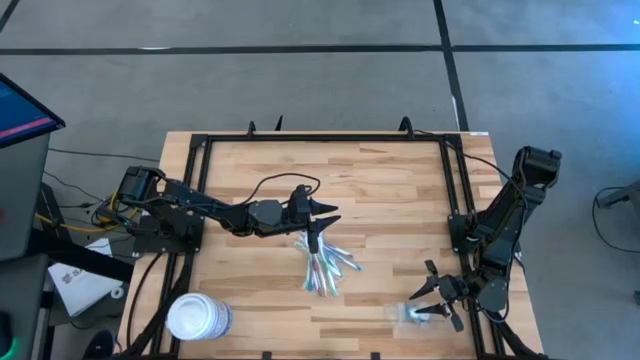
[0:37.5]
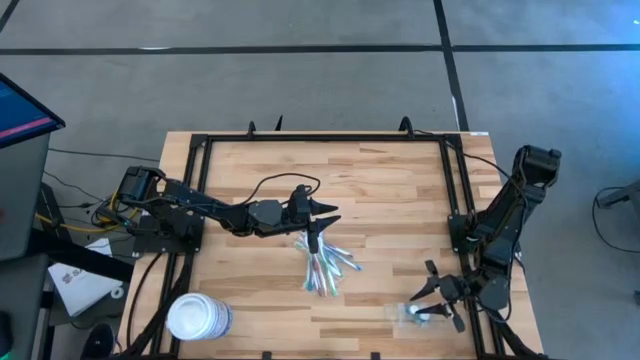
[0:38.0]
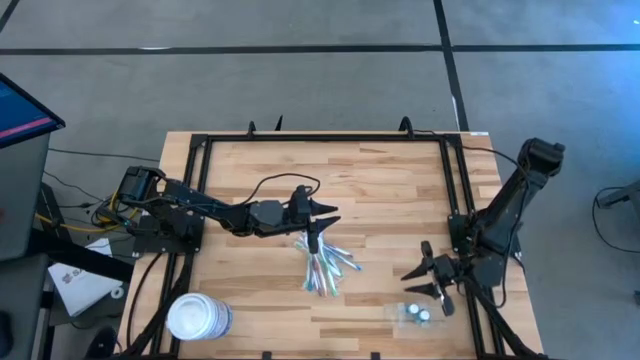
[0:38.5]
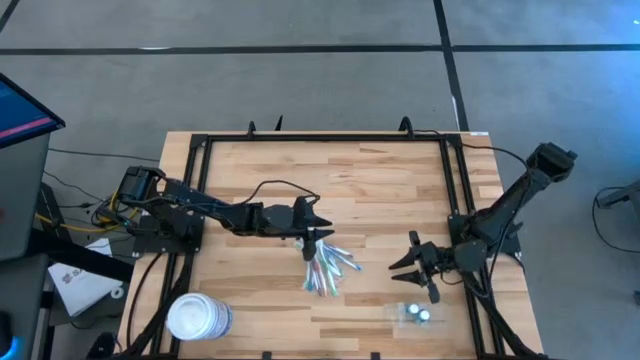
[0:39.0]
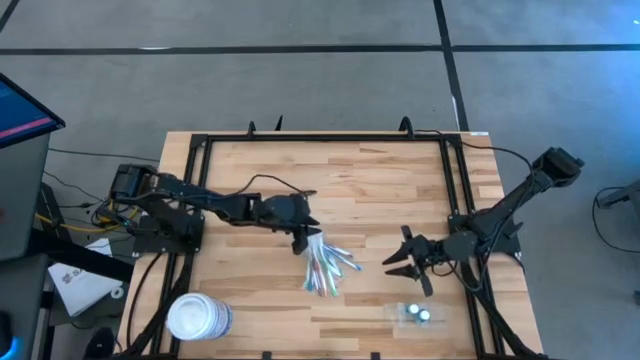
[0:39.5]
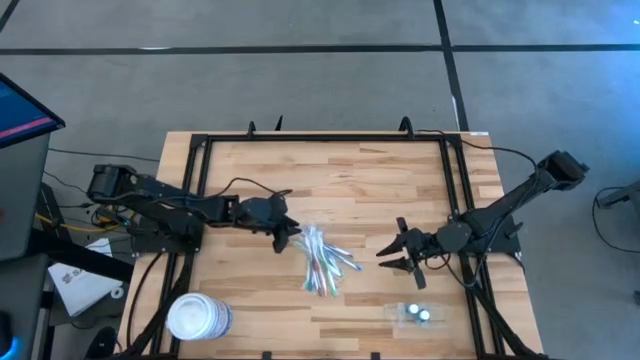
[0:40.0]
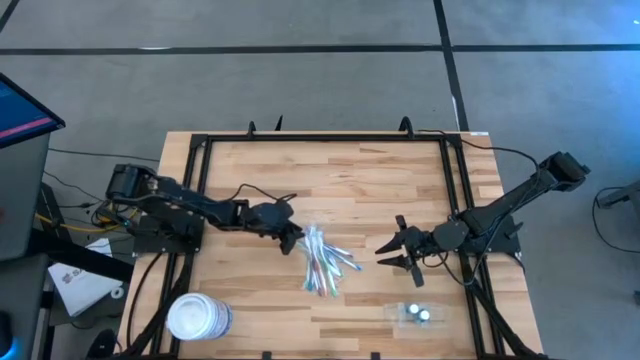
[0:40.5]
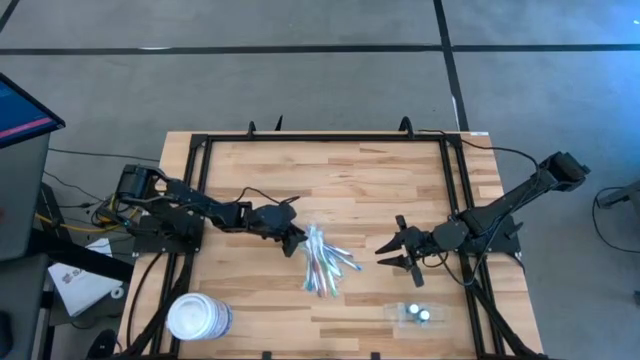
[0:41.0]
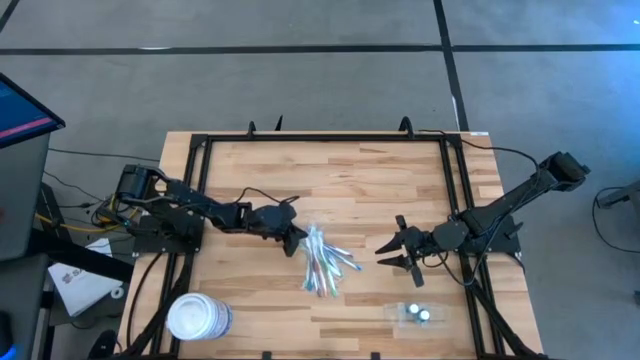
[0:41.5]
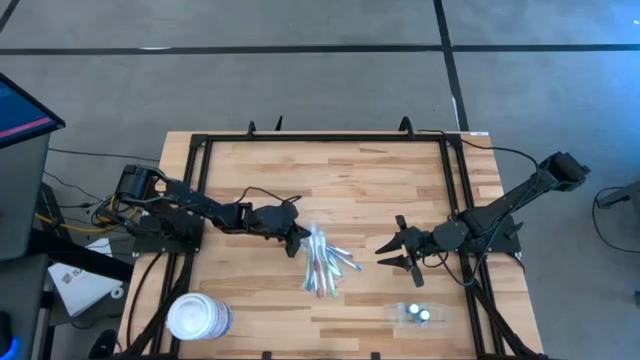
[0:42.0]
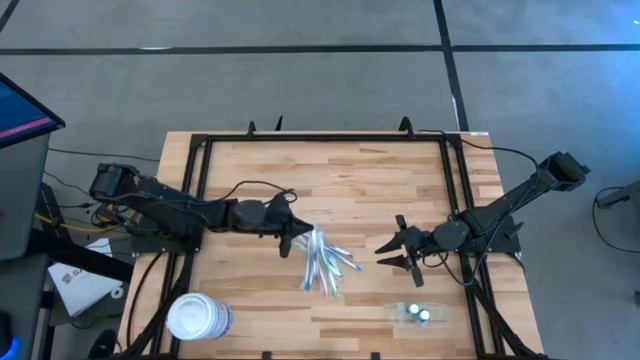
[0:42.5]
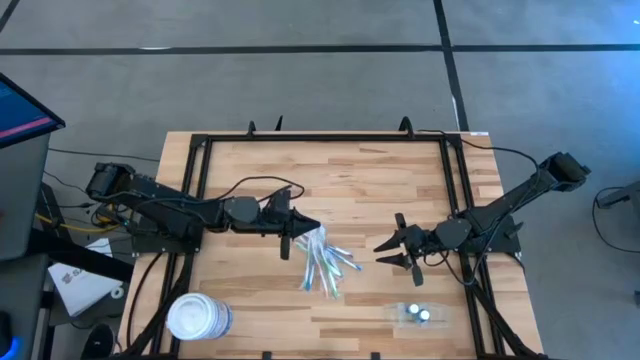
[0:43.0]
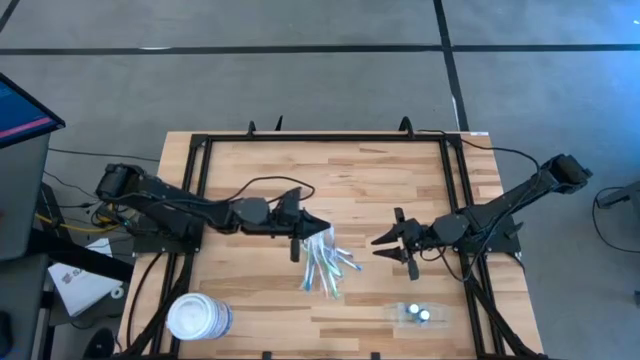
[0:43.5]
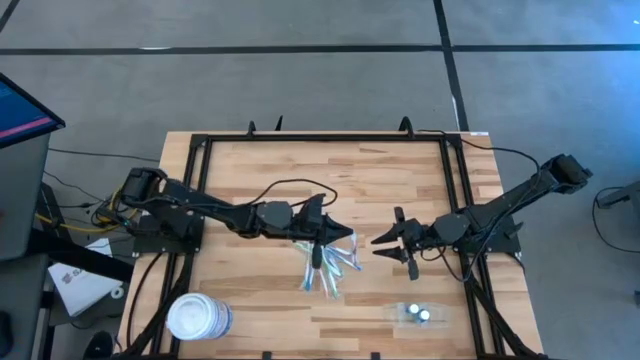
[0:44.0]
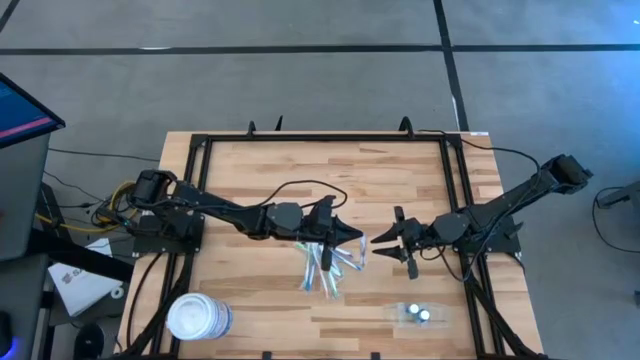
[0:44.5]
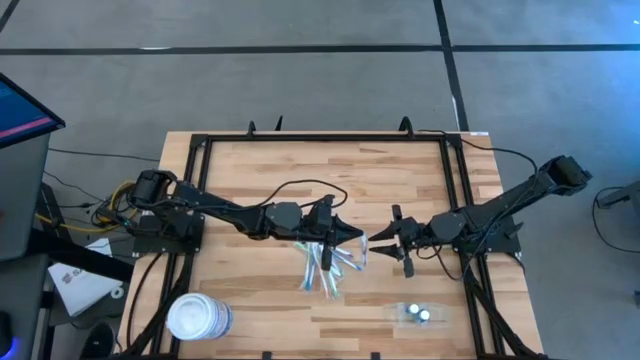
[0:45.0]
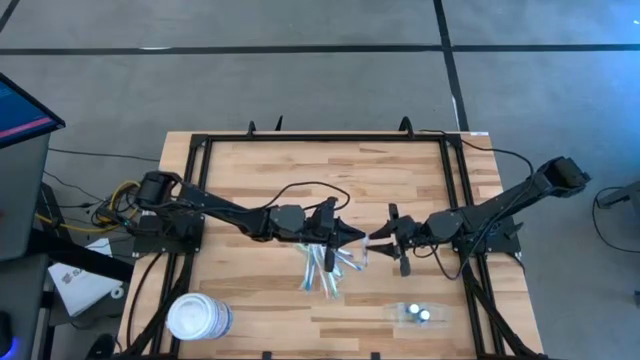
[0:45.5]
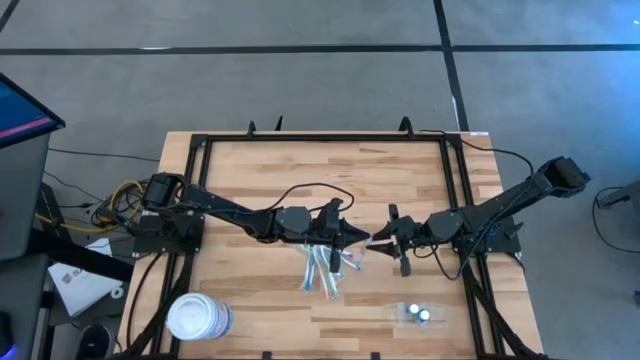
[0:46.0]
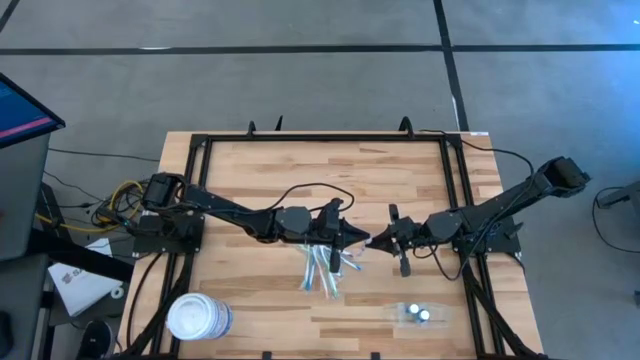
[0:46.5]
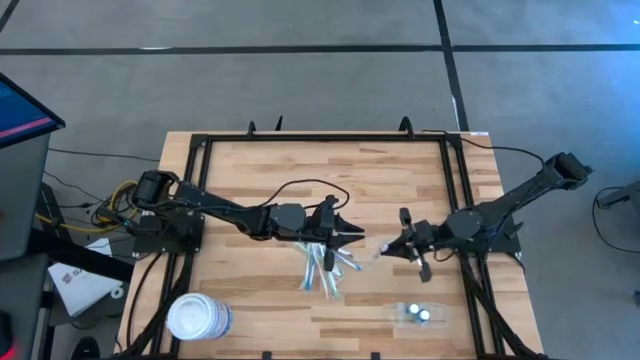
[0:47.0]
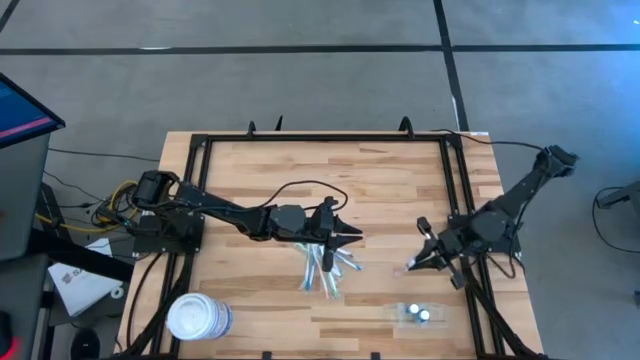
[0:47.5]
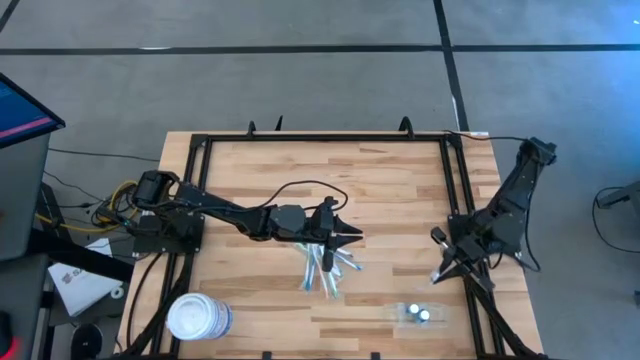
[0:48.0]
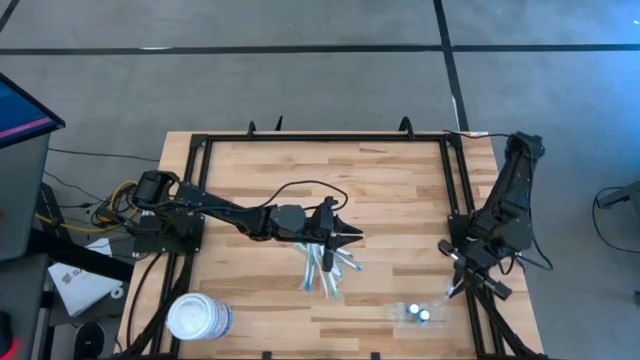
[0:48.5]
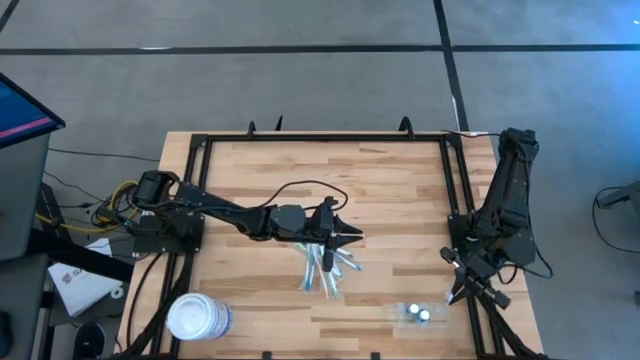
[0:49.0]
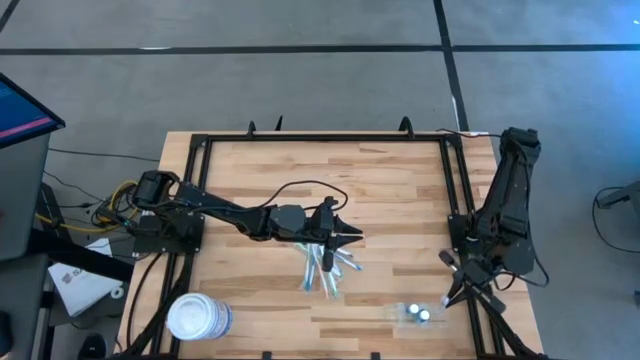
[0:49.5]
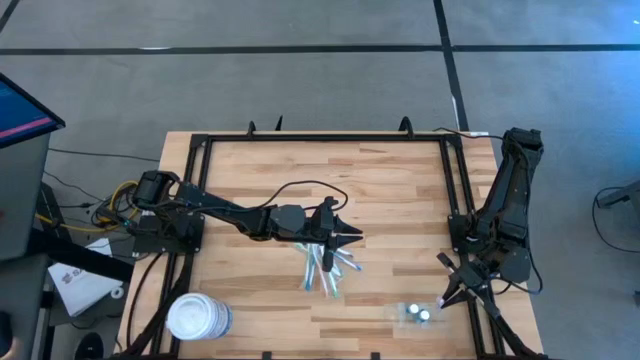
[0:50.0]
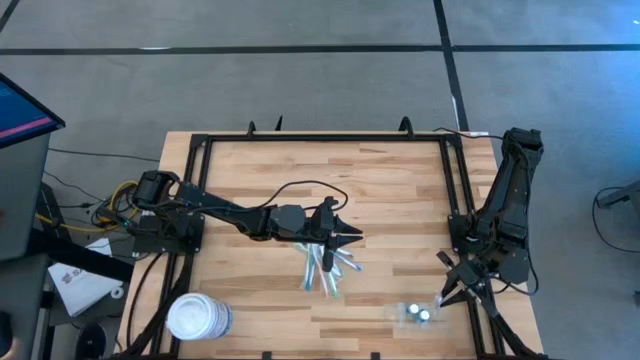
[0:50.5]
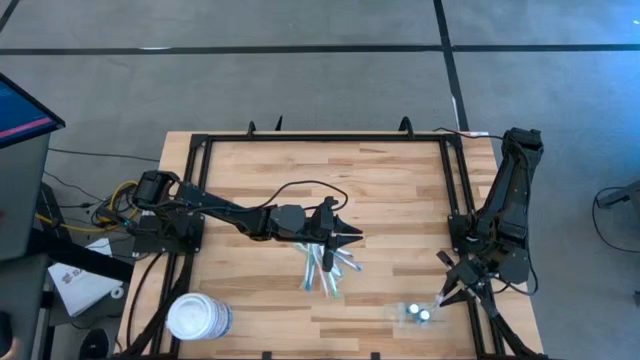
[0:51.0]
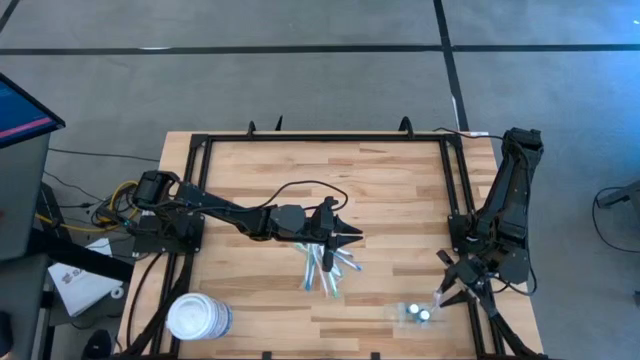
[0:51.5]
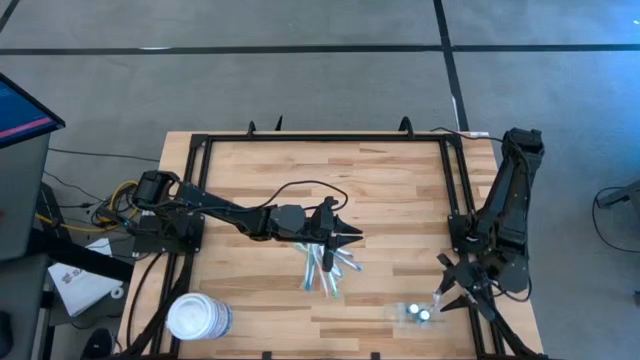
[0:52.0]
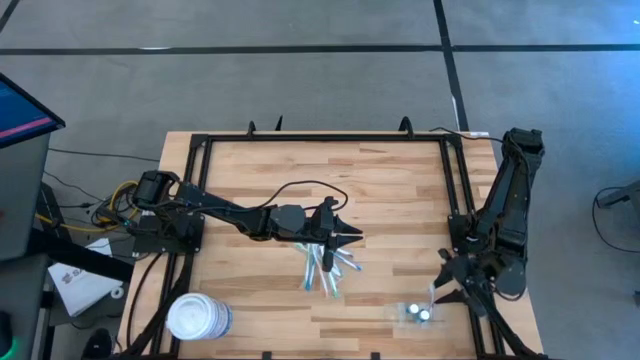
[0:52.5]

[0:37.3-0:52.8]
Task: Pick & Place toothbrushing station
Put the purple toothbrush into the transparent organizer

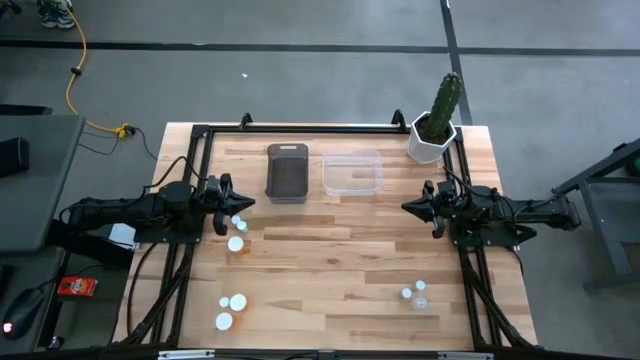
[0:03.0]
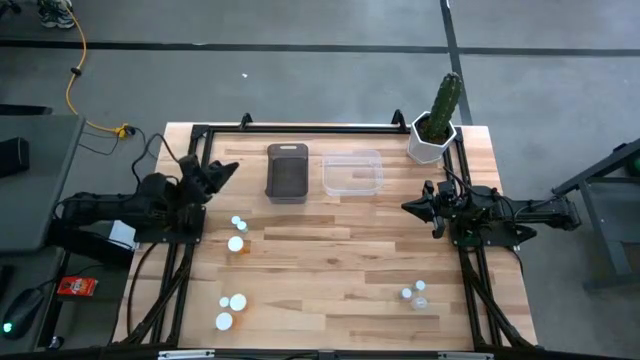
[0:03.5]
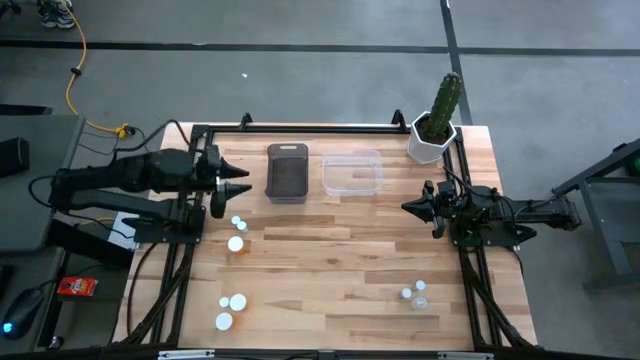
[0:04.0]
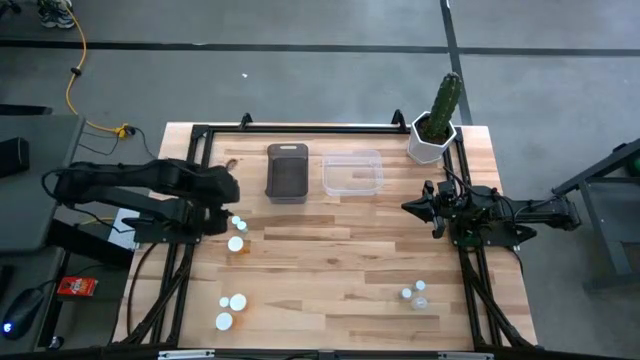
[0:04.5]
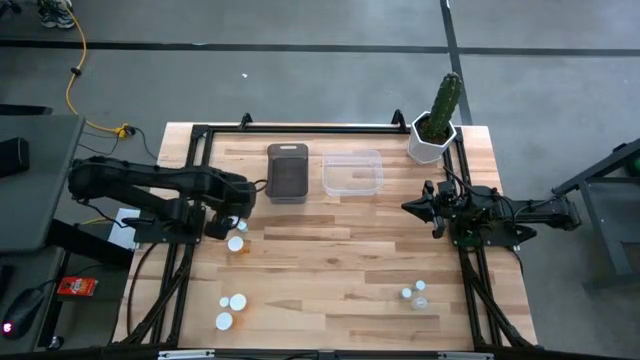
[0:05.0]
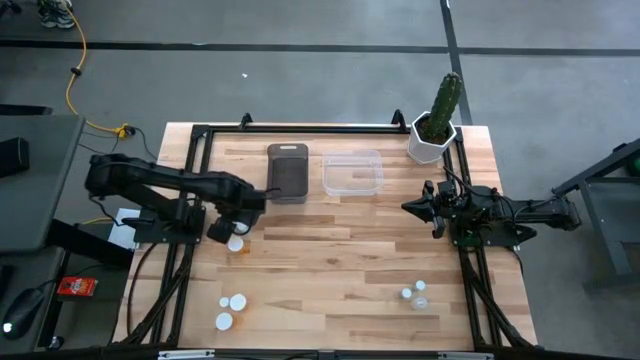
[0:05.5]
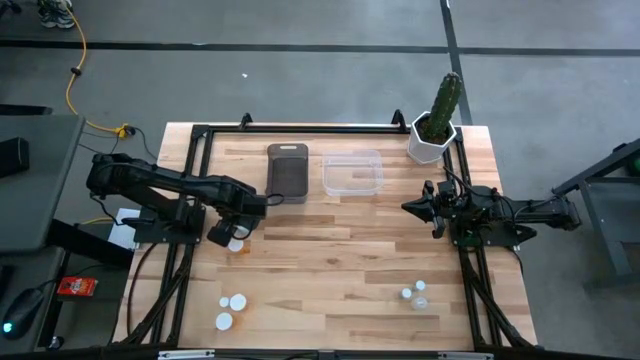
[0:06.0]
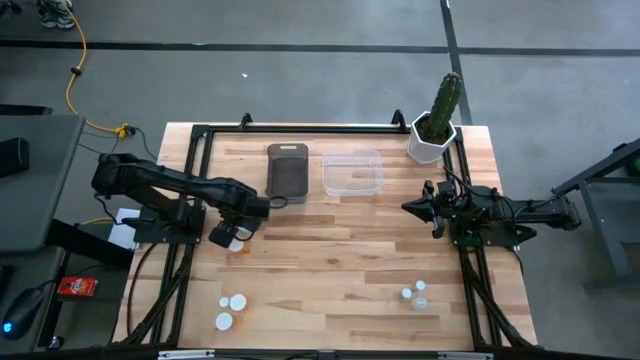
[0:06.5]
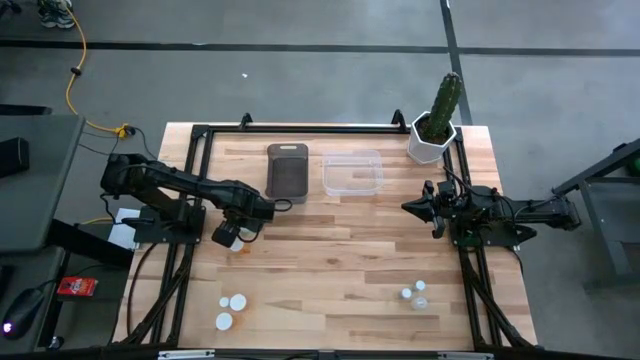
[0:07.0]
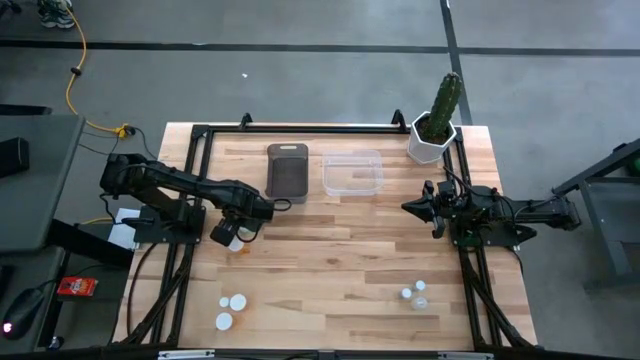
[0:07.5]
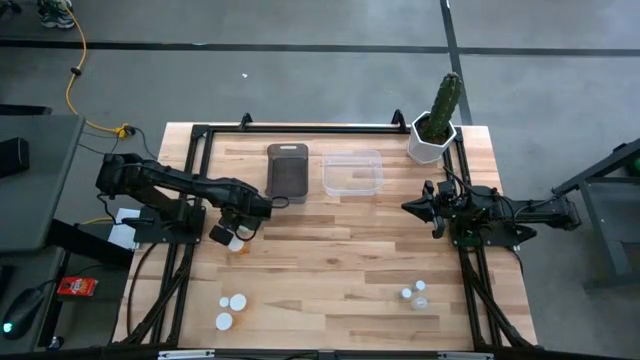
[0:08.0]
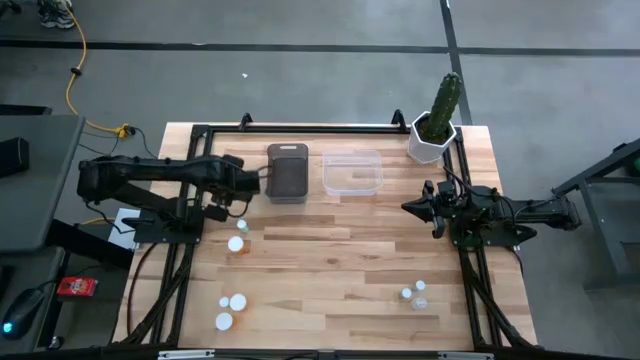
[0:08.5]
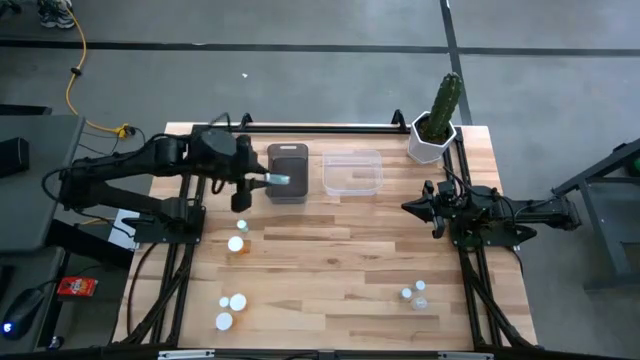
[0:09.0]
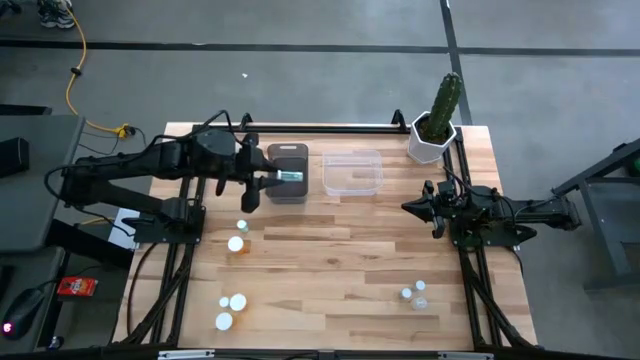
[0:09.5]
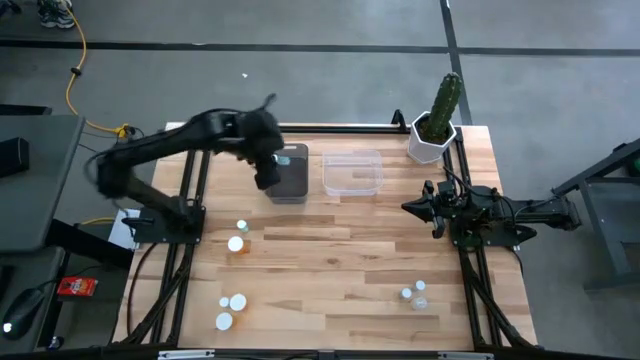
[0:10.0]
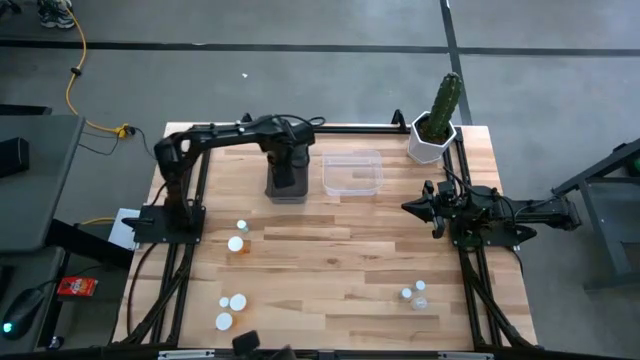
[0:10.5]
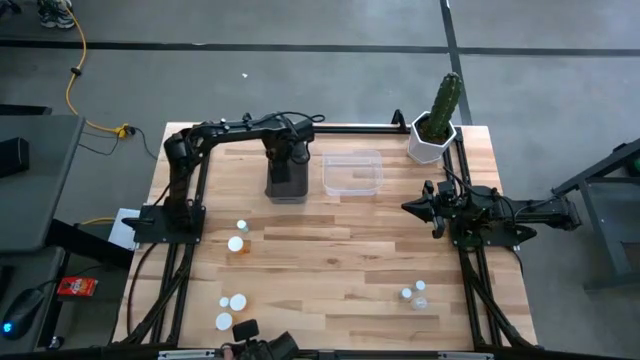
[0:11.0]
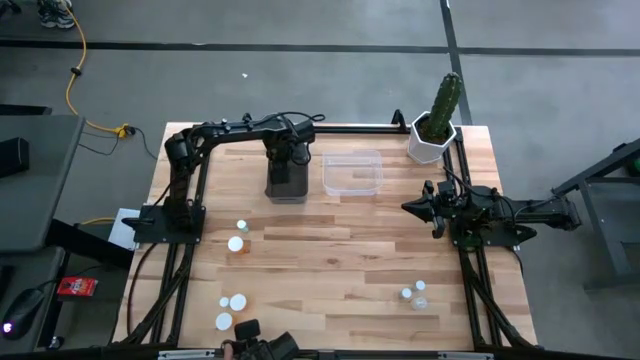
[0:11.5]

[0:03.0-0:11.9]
Task: Pick and place medicine bottles into bin by pill shape (circle, oval)
Put the blue tablet bottle into the black bin
